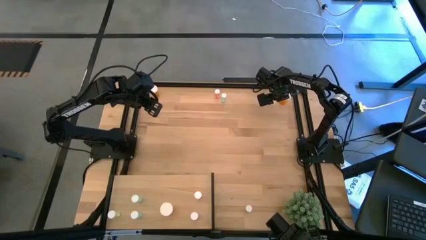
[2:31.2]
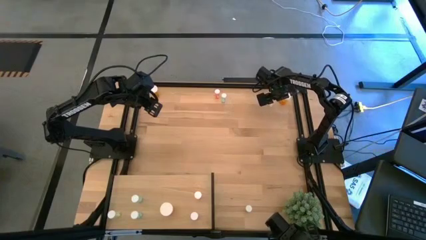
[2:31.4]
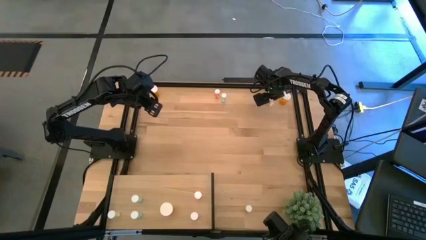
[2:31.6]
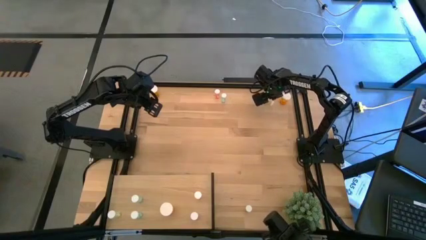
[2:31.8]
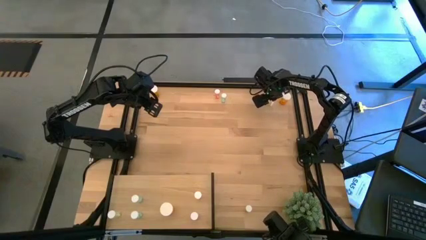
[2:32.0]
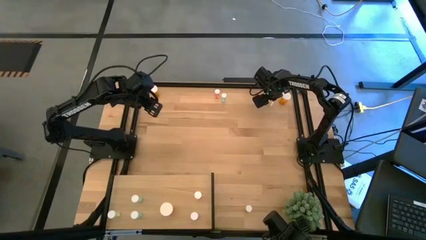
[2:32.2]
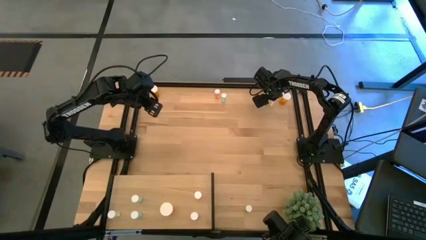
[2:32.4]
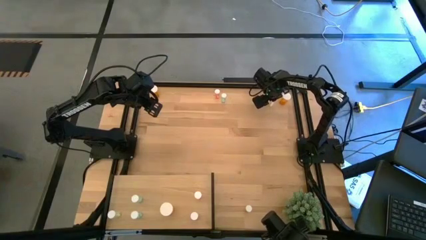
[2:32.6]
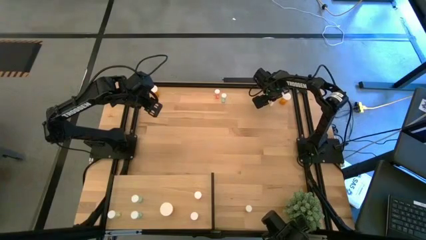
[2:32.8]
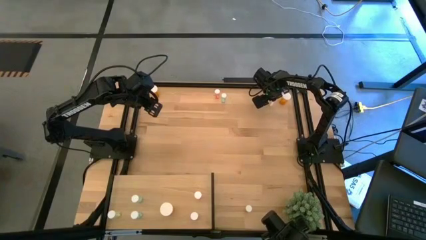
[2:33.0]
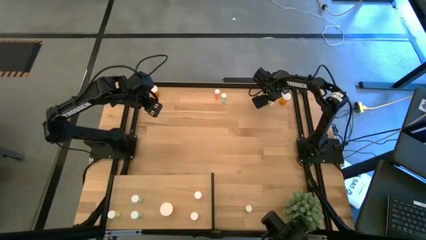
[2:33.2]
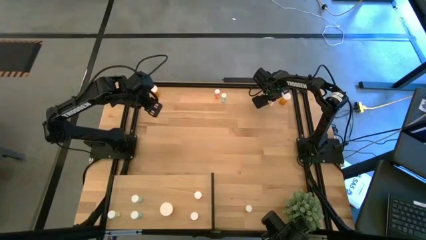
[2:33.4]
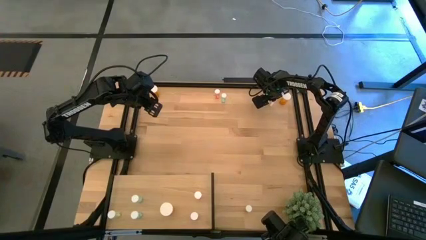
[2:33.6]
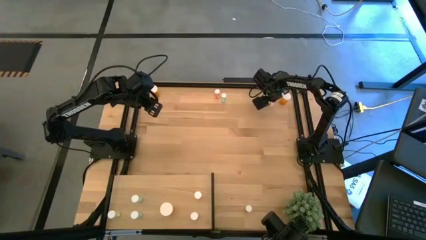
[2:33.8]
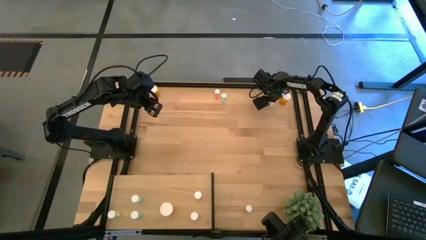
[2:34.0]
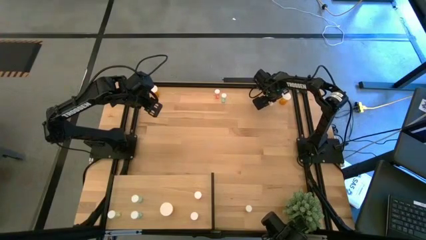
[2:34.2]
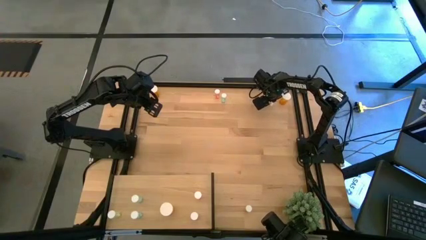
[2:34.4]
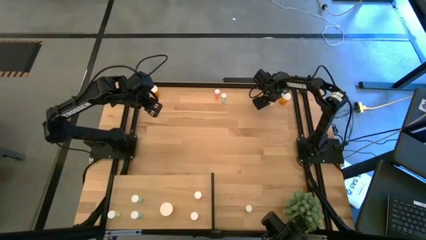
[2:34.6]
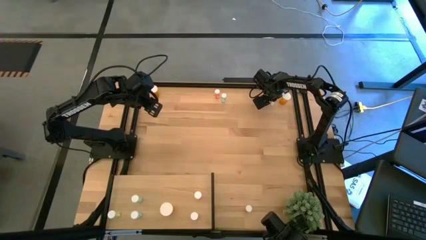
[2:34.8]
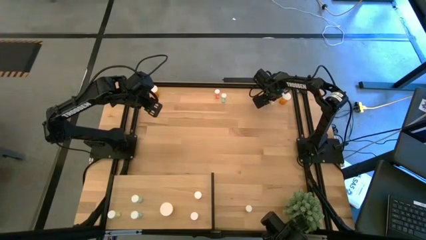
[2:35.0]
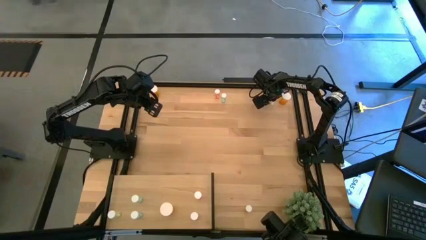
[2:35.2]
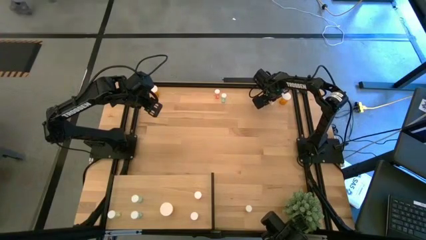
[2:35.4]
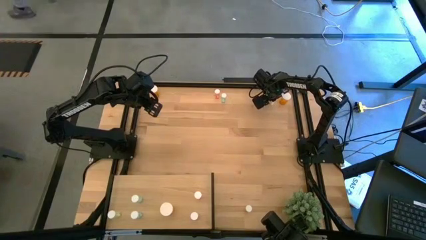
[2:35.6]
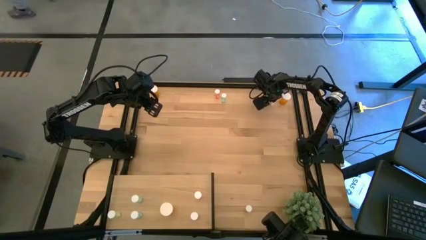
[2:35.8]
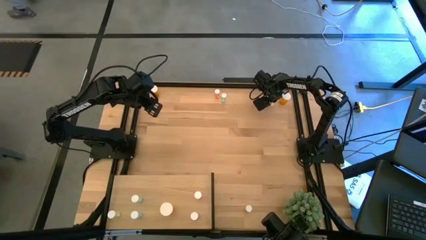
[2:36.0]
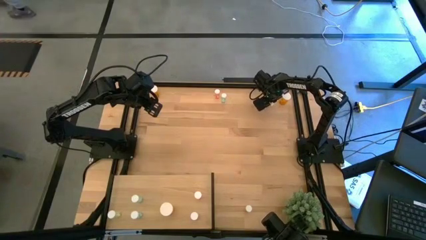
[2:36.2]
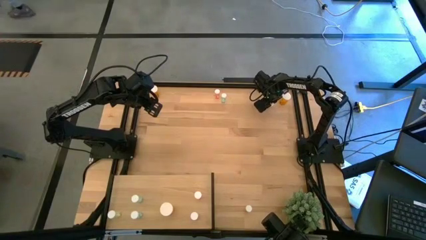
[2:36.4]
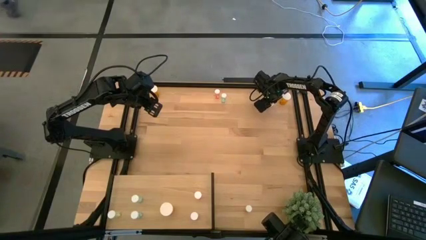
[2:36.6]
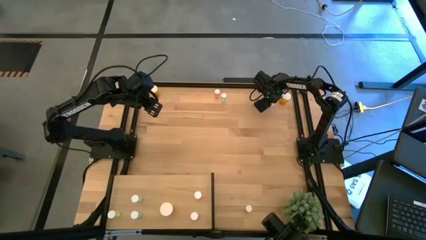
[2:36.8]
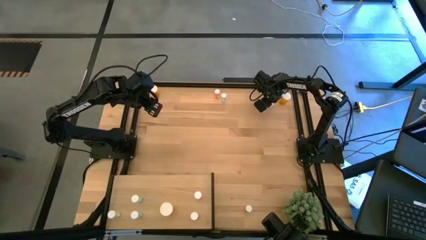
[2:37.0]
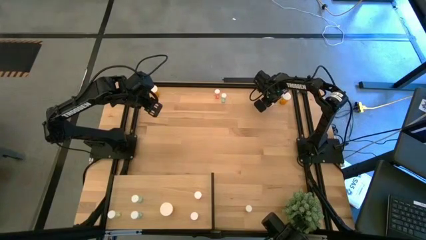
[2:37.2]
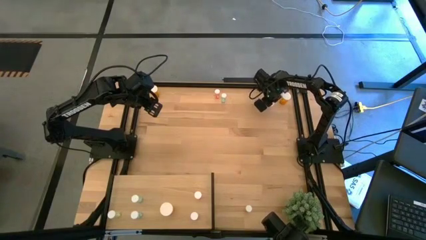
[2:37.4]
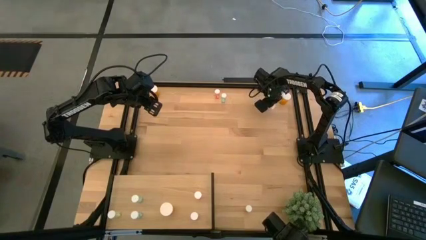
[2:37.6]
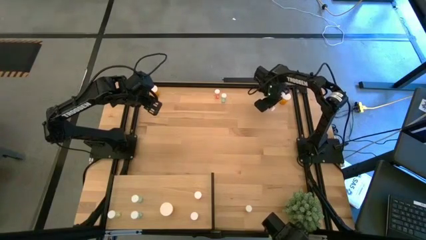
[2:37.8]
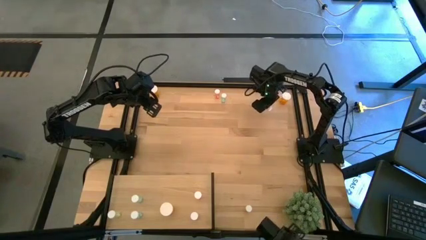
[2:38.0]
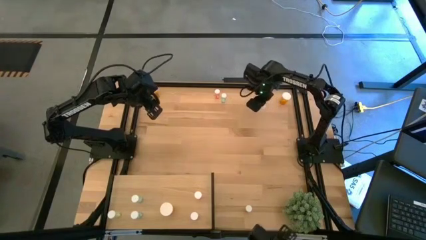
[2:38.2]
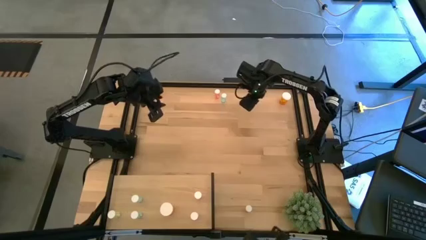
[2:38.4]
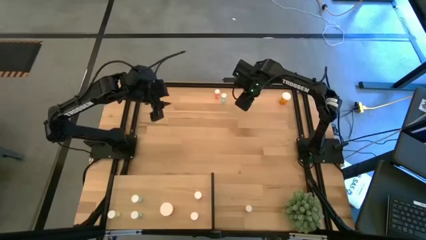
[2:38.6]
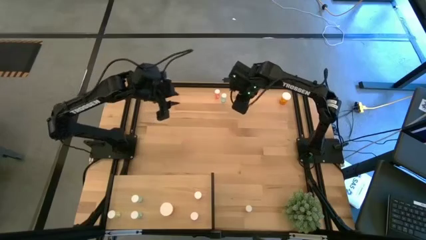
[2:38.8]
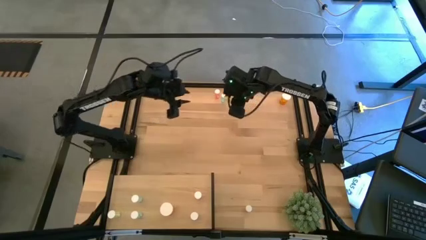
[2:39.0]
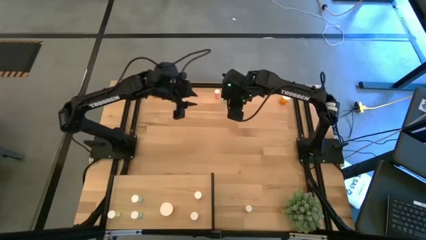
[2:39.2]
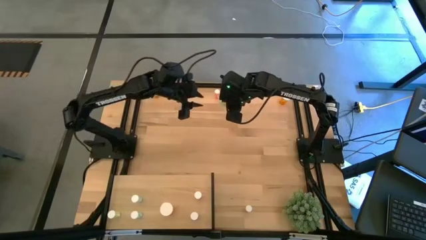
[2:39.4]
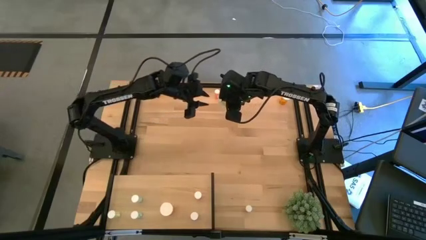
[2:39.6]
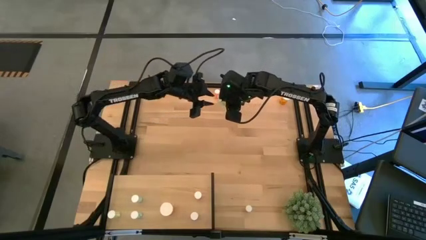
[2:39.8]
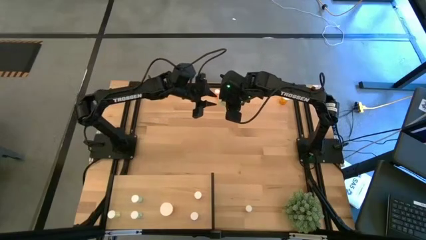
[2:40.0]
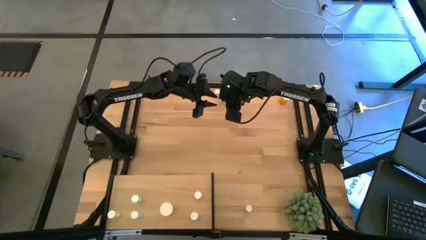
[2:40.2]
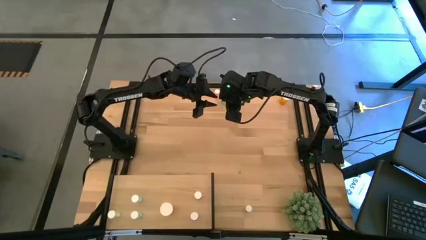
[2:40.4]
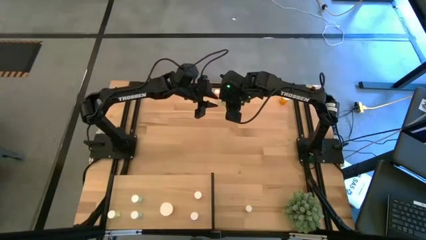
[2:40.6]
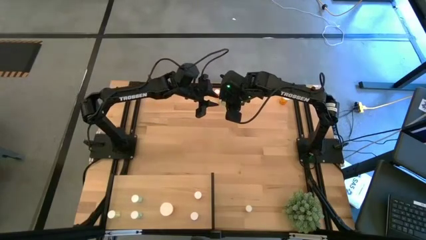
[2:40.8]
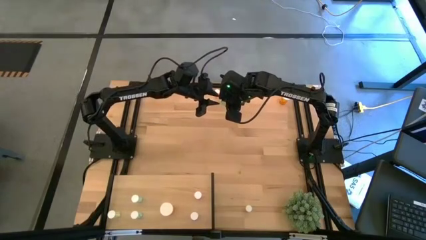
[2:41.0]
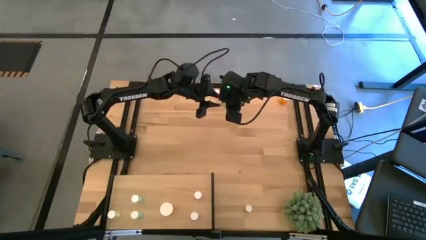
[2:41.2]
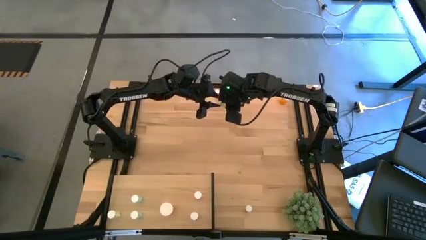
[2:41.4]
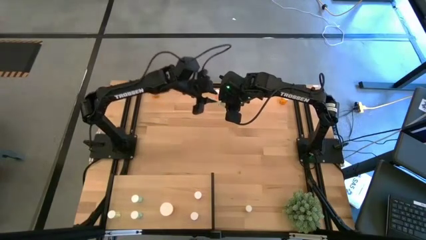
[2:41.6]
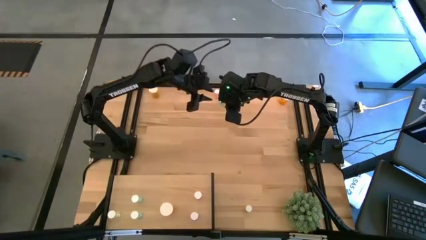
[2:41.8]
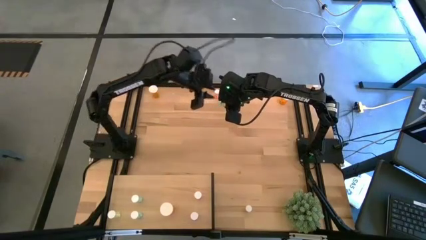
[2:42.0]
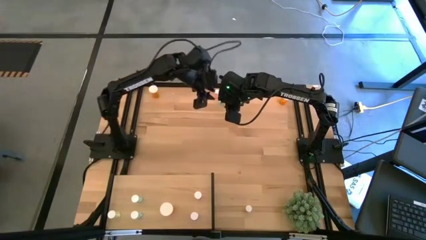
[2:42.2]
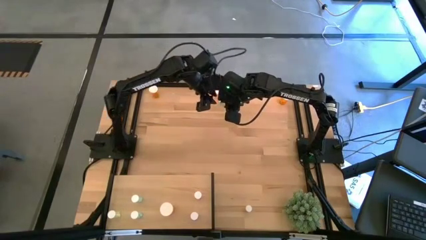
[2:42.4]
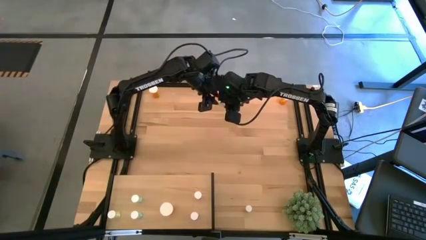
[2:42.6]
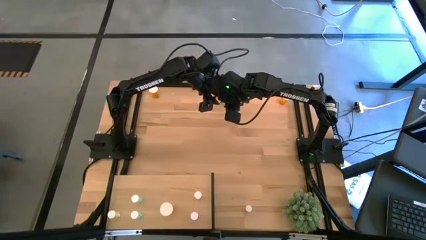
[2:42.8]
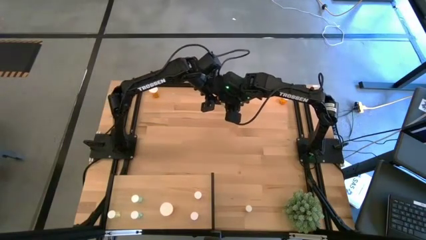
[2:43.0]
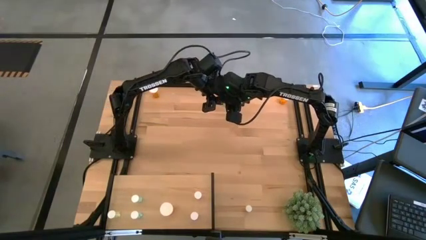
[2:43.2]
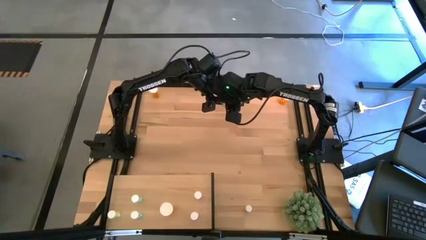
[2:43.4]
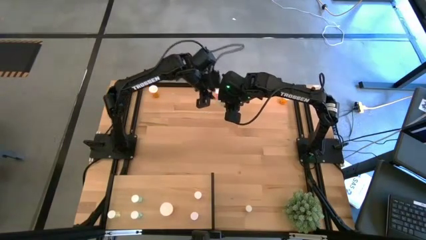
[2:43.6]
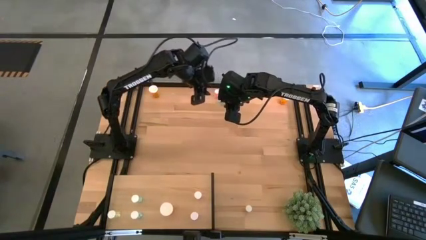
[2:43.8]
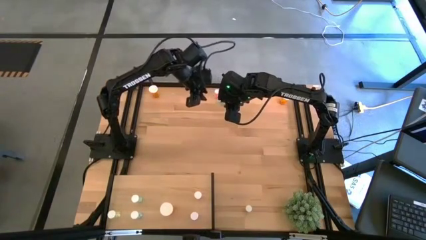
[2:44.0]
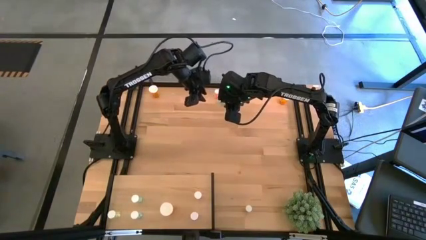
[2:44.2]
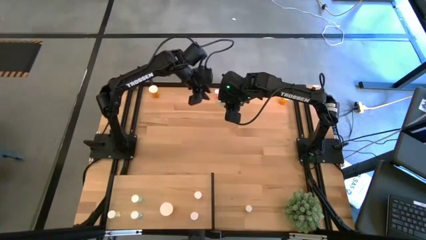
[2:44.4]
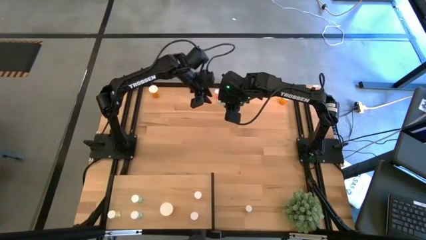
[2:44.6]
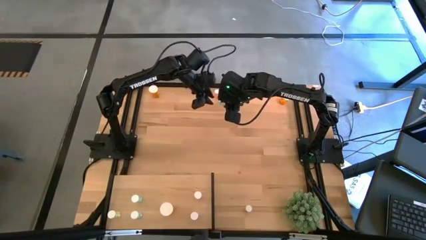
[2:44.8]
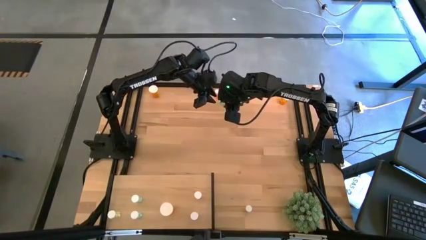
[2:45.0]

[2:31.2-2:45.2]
Task: Pick and place medicine bottles onto shelf by color
Put the top right yellow pill bottle on the shelf aligned with the other yellow pill bottle

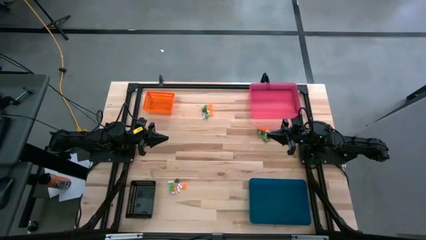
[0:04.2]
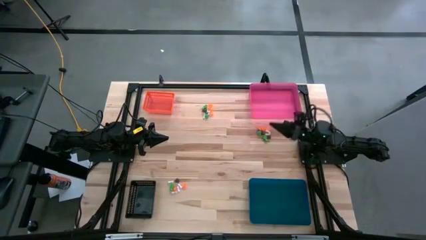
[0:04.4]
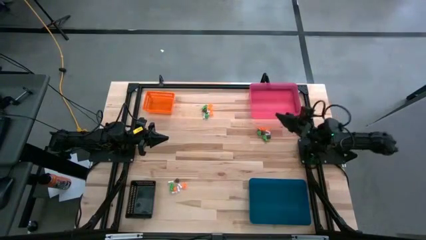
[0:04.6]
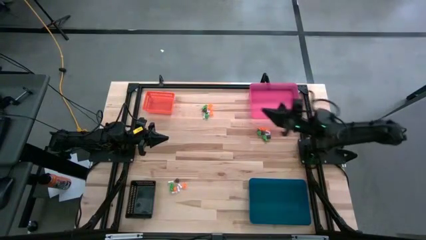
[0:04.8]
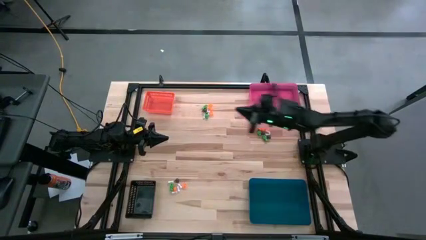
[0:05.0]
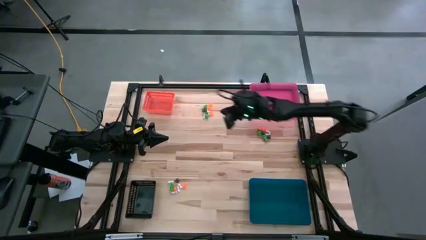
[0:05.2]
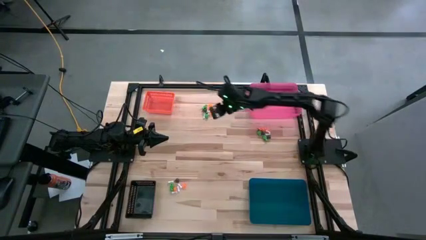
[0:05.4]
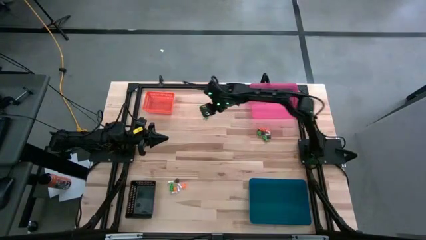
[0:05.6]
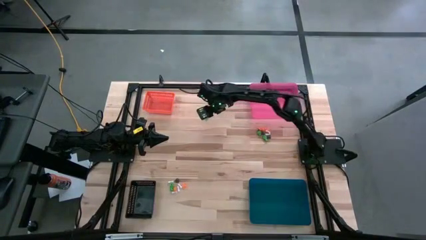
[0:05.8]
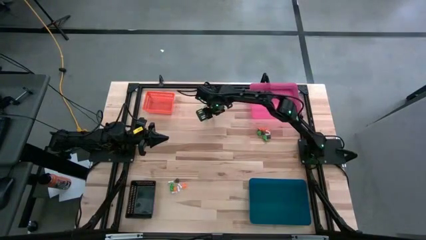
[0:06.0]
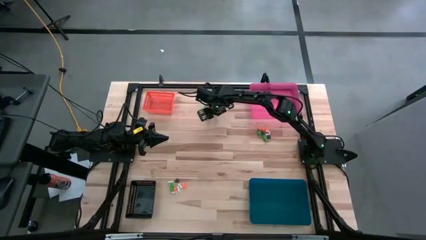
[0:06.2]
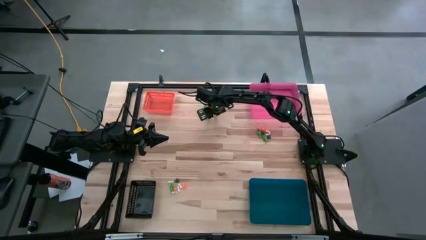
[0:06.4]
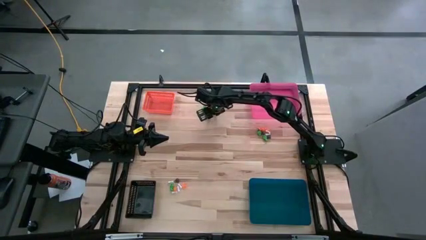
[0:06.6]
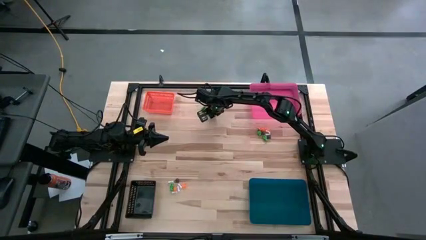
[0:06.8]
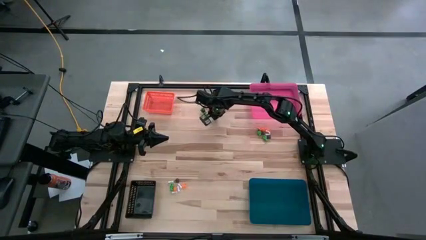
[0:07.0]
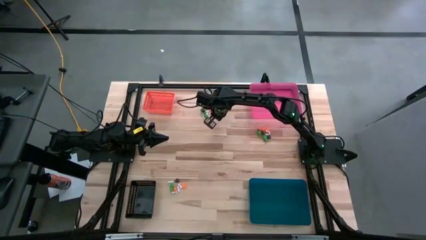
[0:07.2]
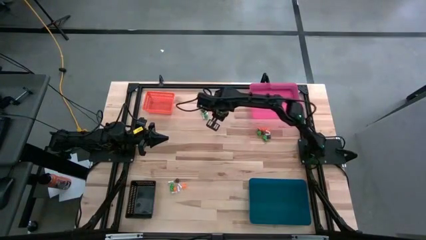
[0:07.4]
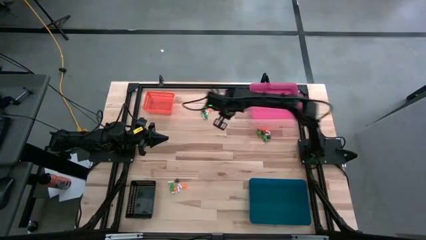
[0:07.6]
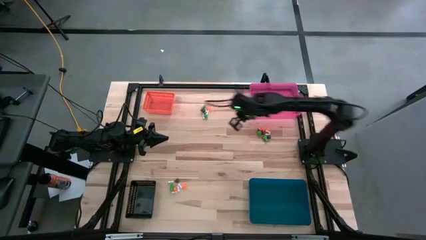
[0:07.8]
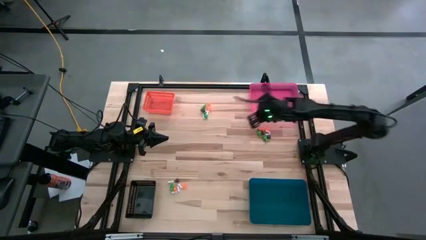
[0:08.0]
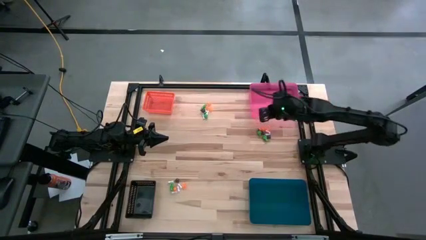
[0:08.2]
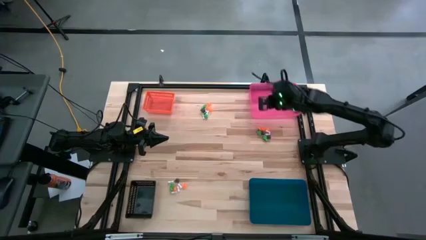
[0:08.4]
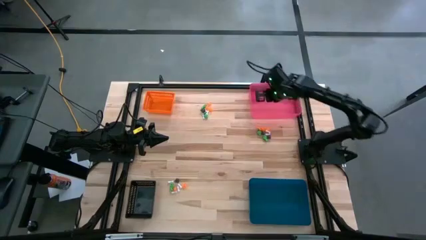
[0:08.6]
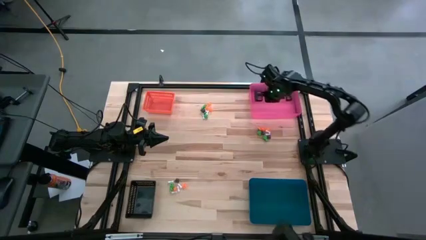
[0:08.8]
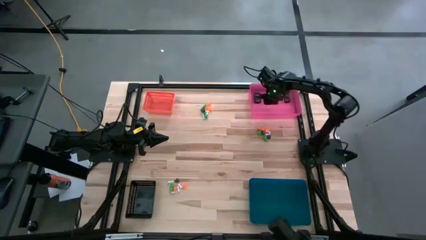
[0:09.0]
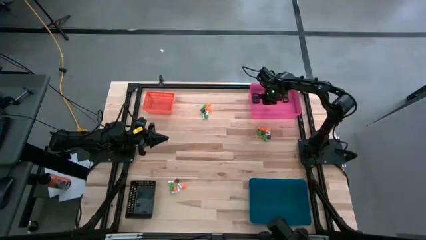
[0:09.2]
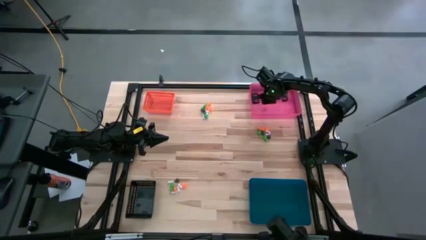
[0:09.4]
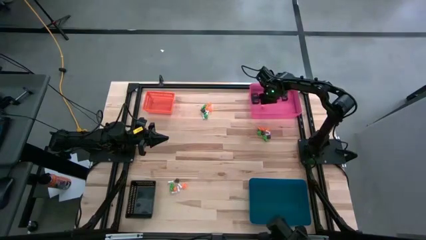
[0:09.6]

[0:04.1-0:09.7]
Task: Sort Halloween decoration
Put the orange spider toy into the pink bin
